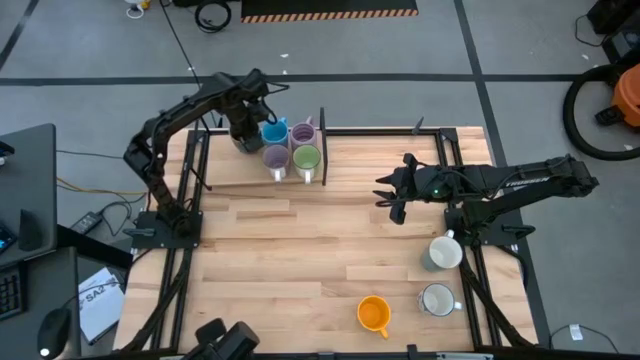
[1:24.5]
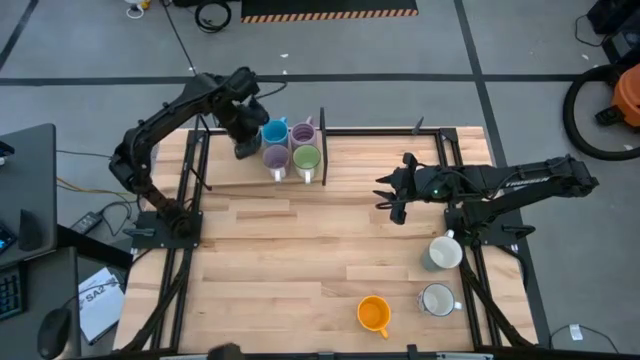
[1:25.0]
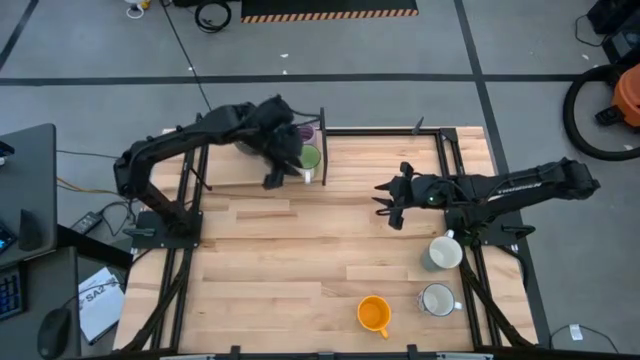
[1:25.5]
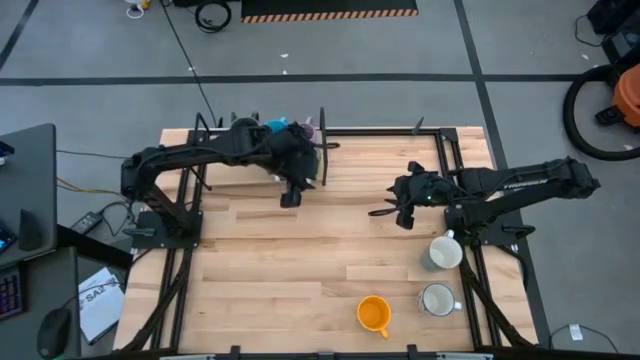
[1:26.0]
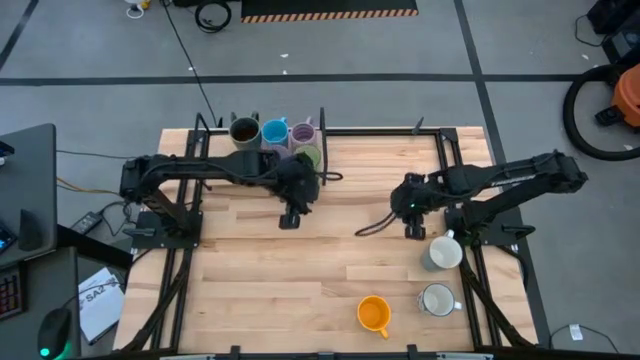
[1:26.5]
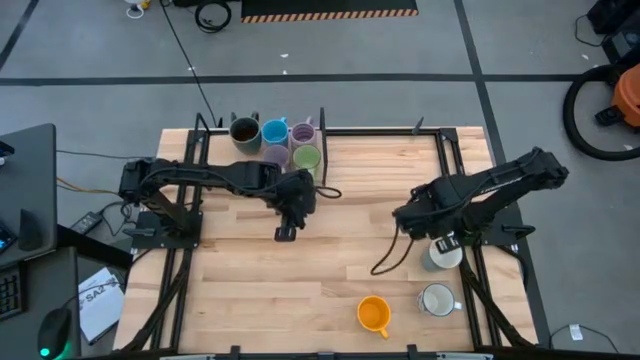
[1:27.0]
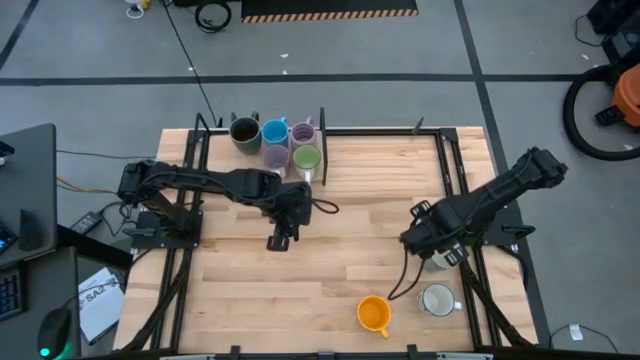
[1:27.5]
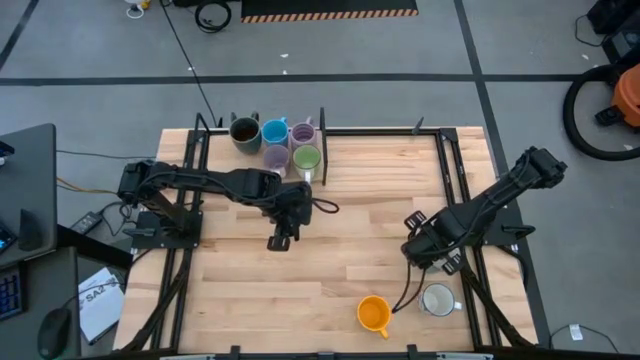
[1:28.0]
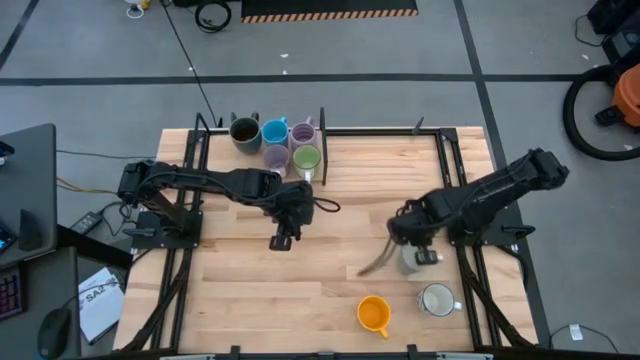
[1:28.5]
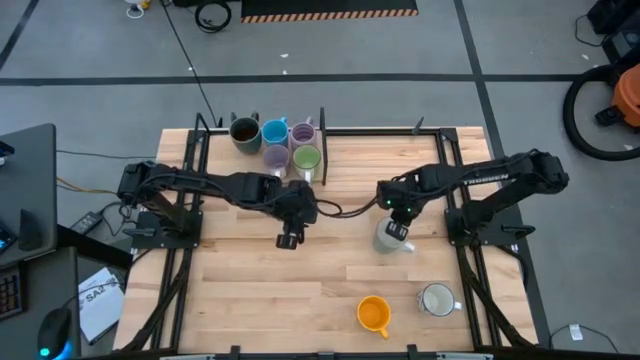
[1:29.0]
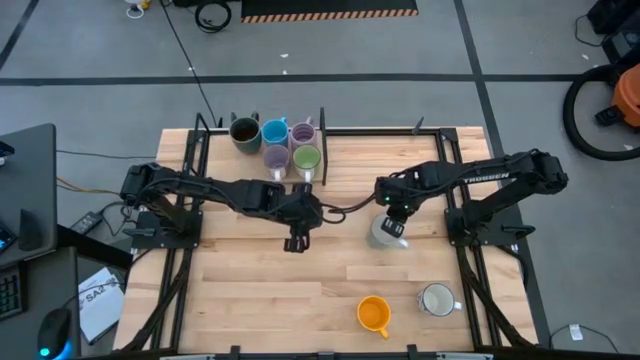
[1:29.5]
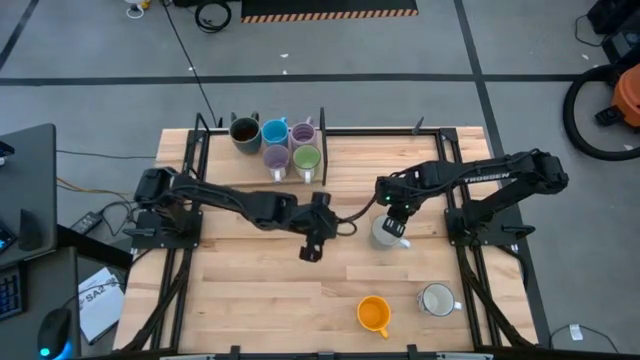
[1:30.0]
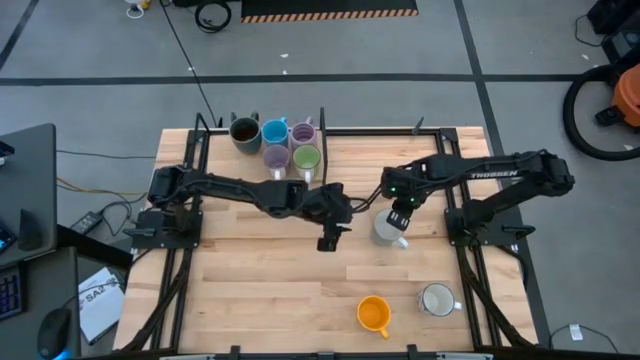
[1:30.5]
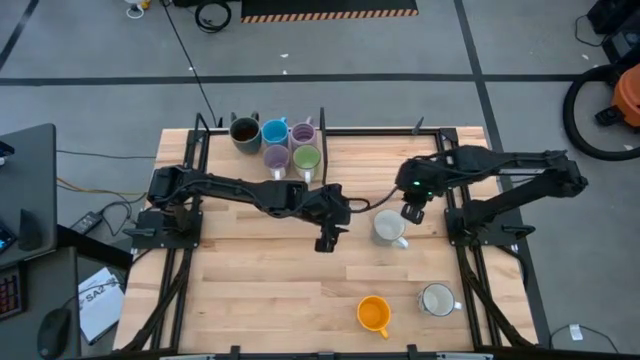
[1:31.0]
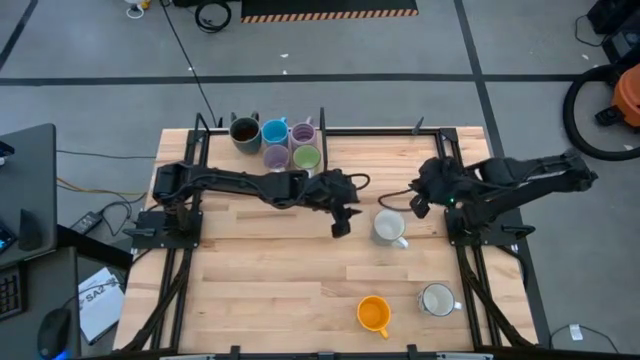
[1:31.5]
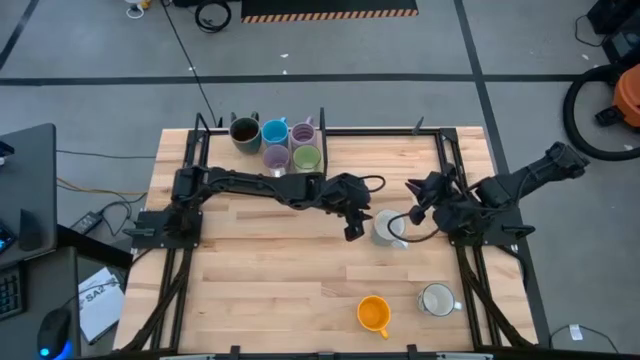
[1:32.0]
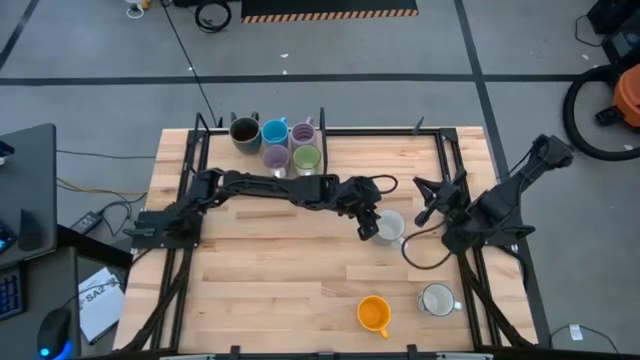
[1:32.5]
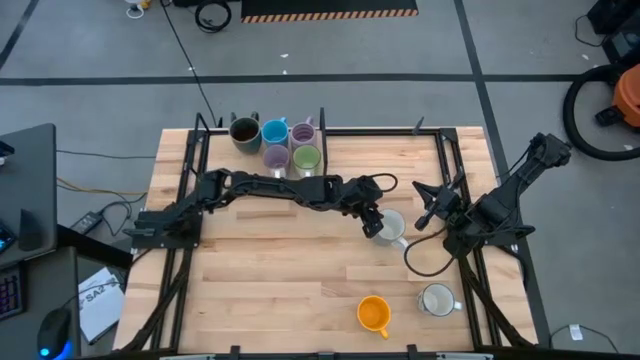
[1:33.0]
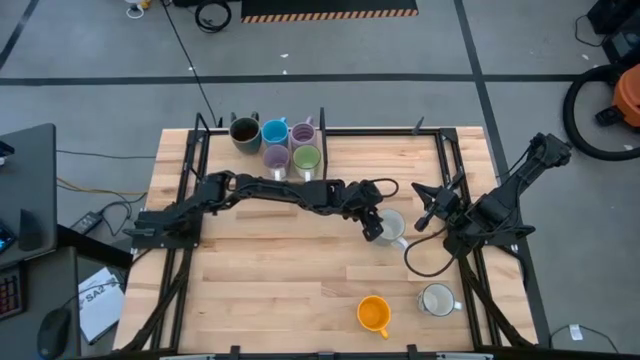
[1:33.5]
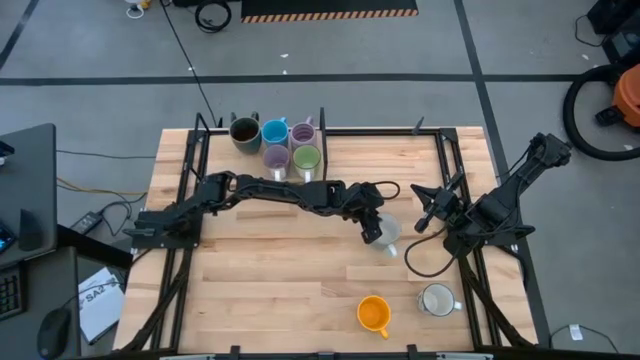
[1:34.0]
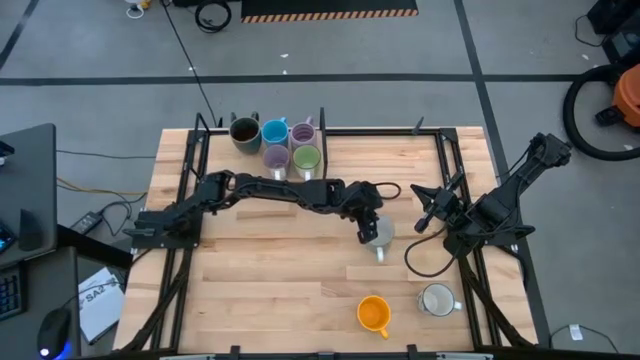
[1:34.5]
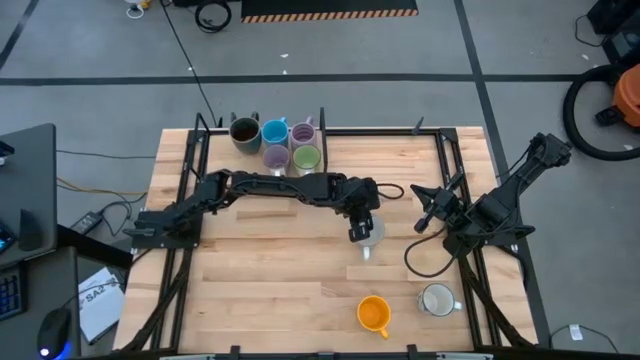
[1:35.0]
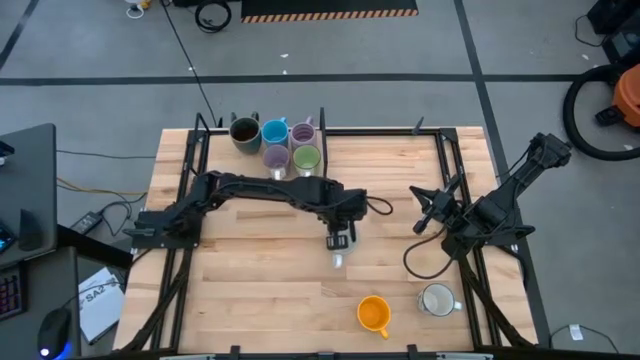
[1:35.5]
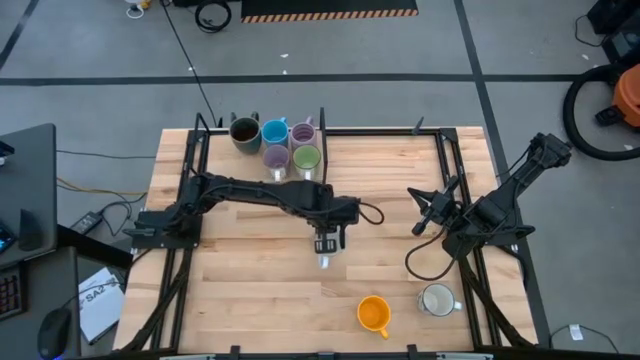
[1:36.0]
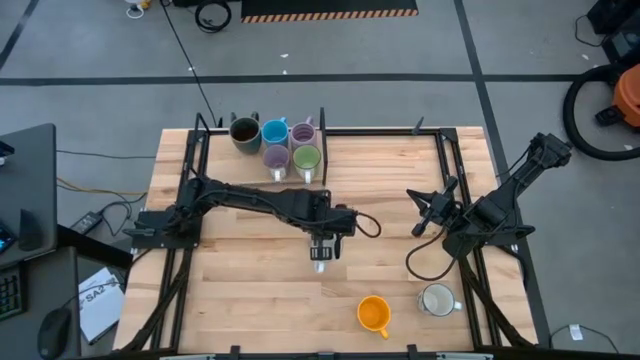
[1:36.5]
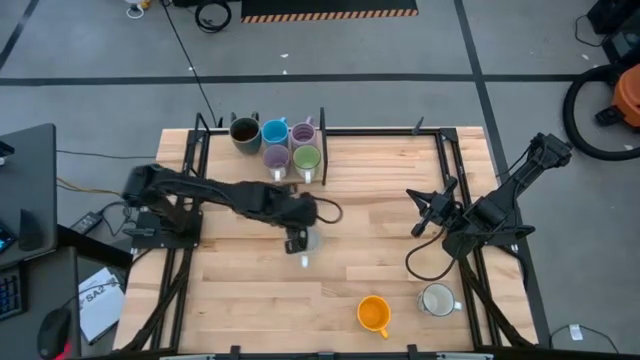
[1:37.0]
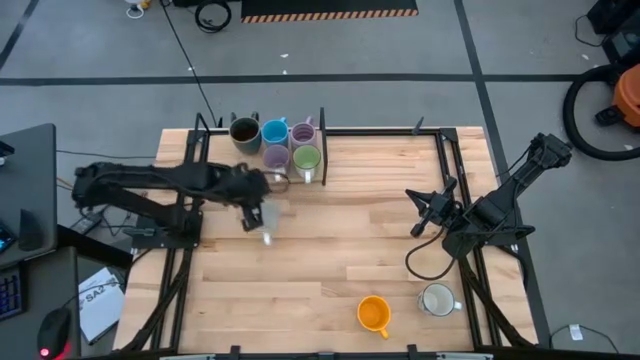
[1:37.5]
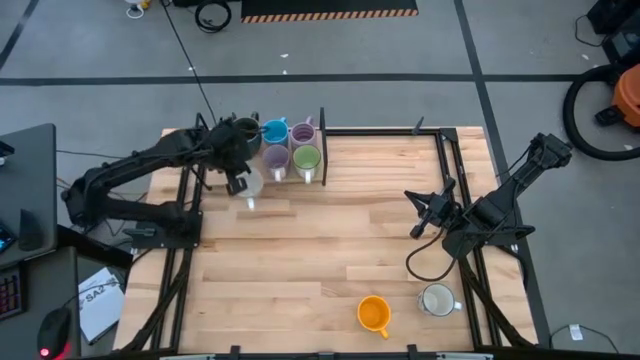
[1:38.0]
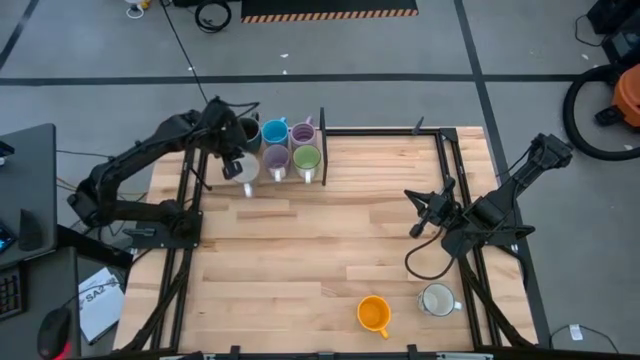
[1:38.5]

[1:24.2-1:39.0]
Task: Place coffee mugs
Put the light blue mug on the shelf

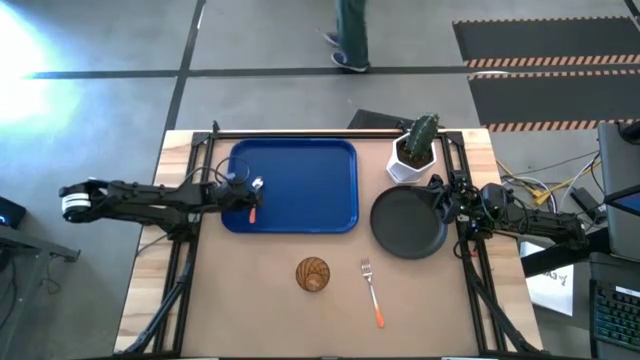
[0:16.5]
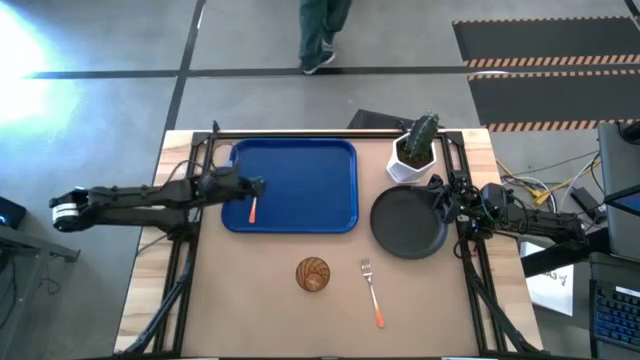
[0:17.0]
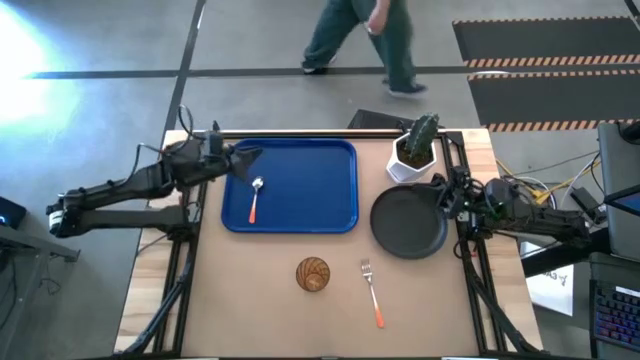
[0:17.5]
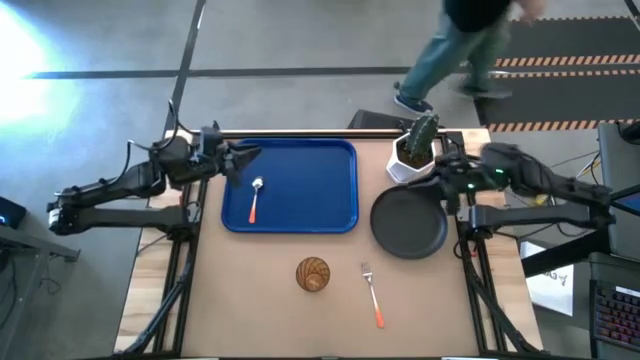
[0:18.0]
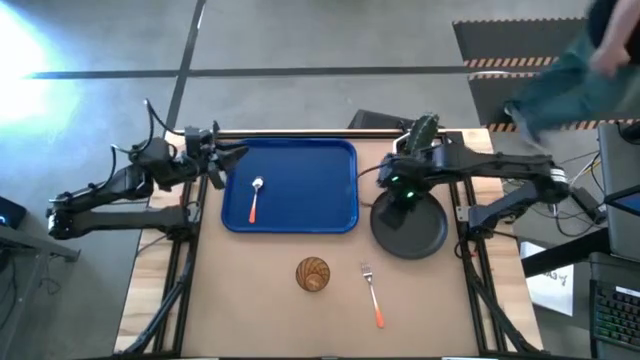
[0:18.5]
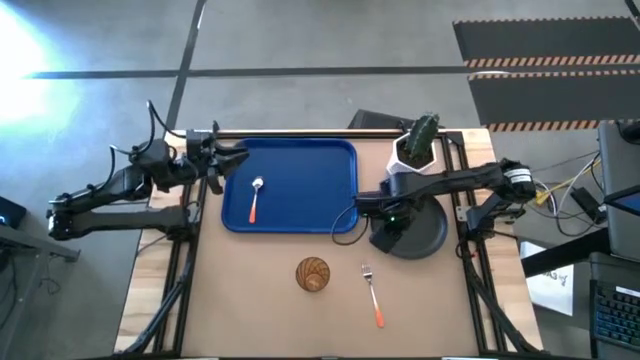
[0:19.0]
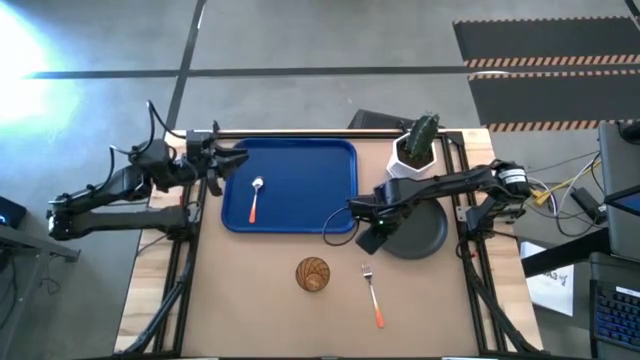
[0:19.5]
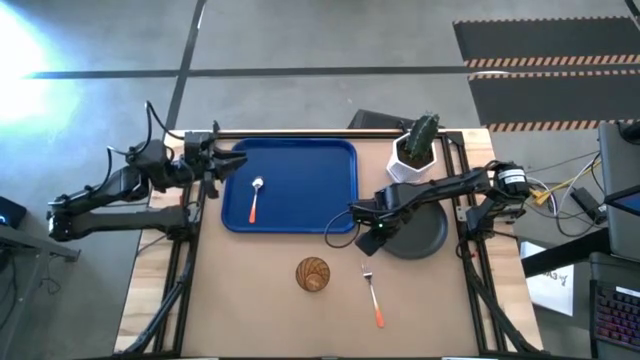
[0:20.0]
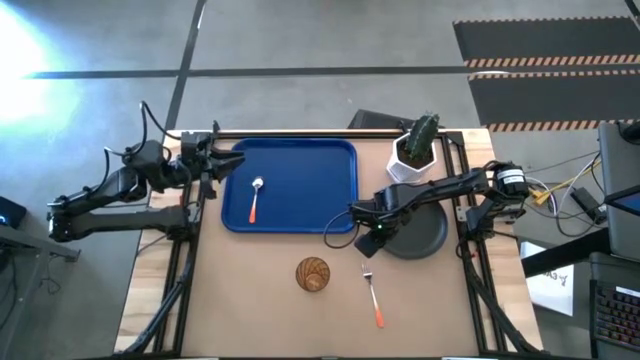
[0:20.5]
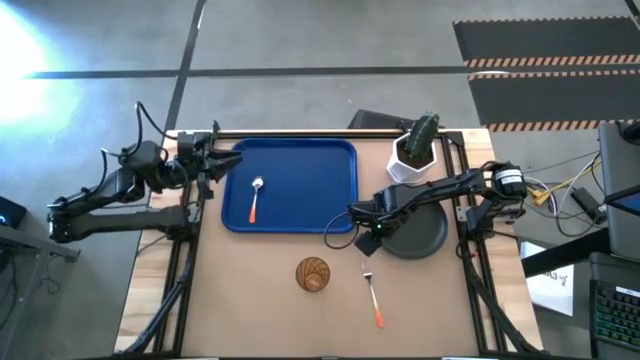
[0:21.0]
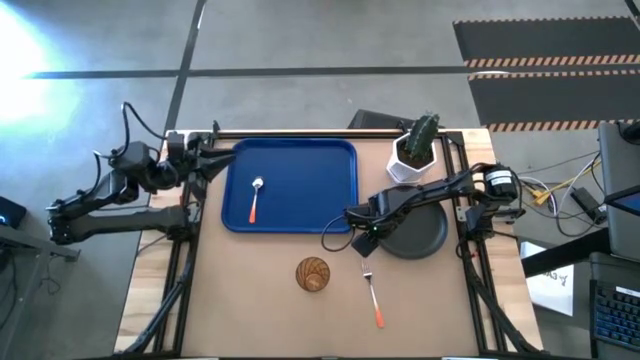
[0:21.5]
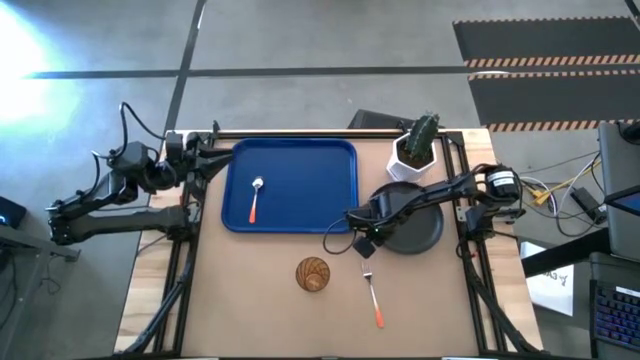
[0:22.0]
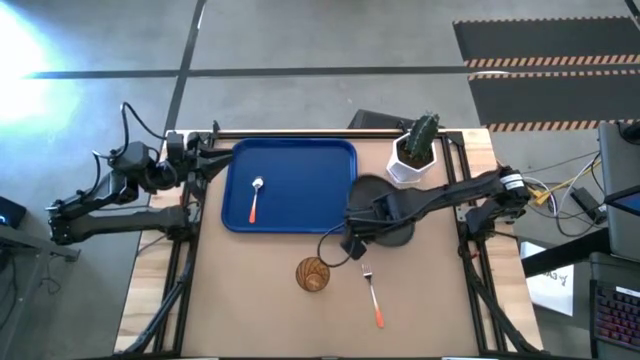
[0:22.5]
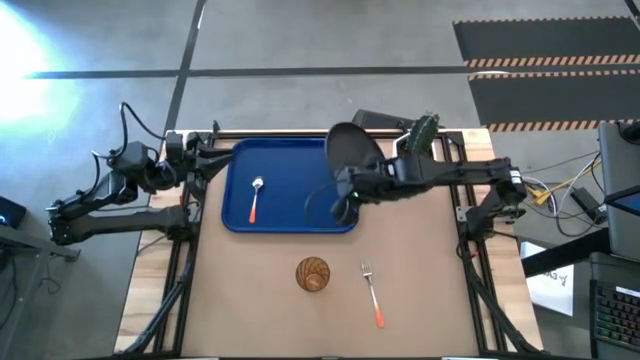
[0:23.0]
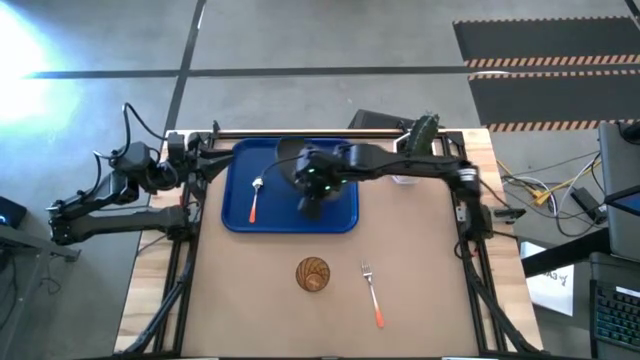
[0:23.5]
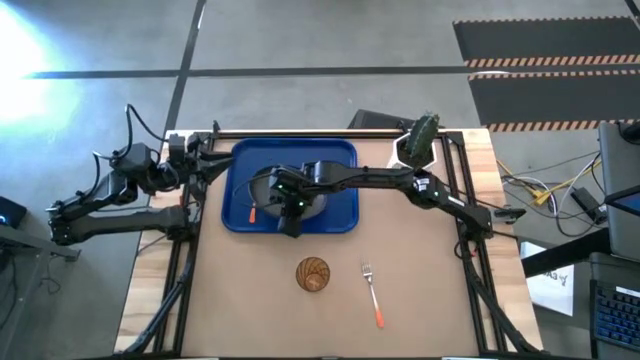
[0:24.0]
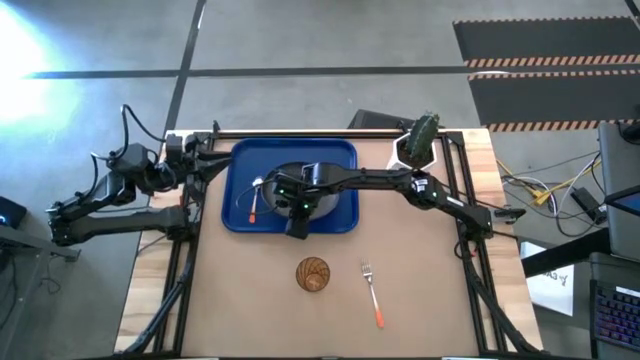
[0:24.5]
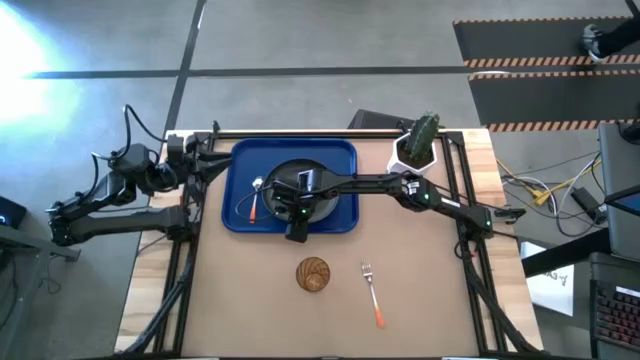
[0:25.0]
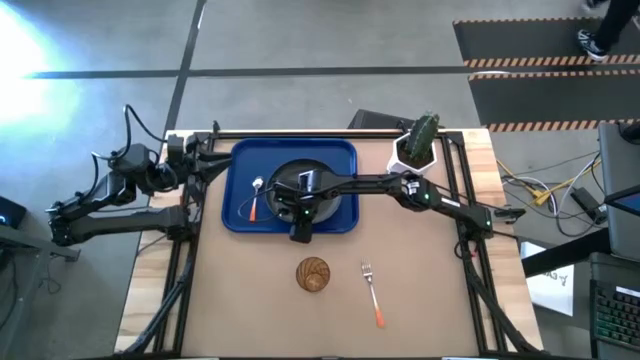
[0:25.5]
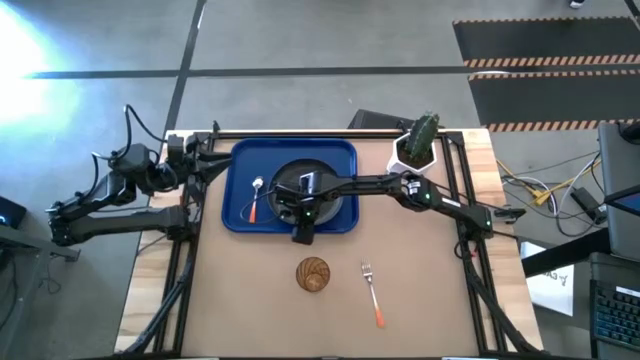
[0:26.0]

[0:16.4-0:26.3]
Task: Pick and place plate/cup/fork/spoon on tray
Put the black plate on the blue tray
